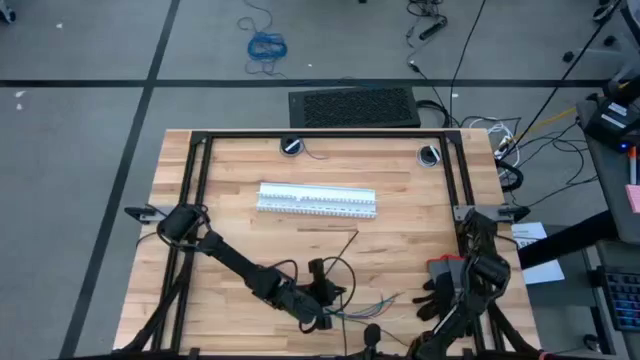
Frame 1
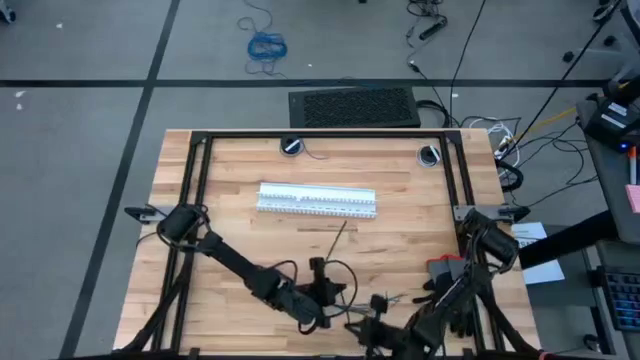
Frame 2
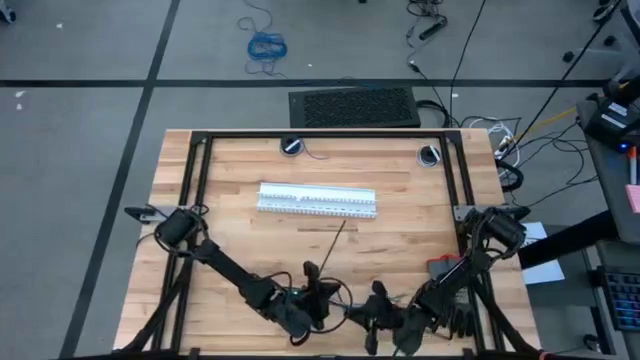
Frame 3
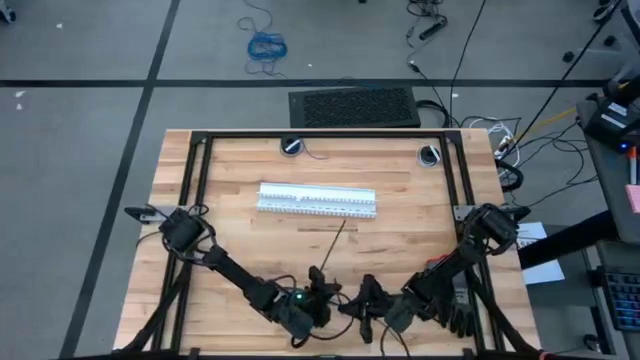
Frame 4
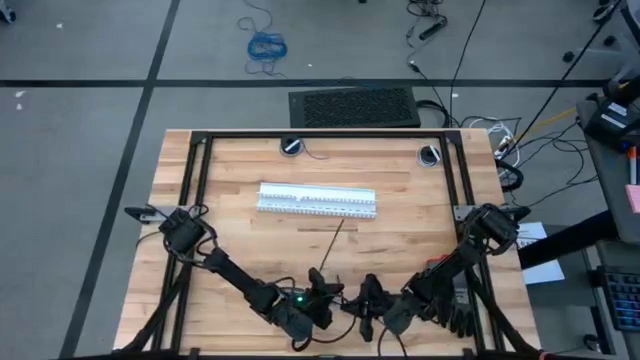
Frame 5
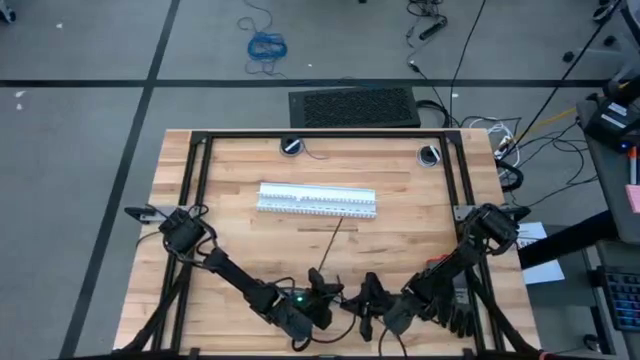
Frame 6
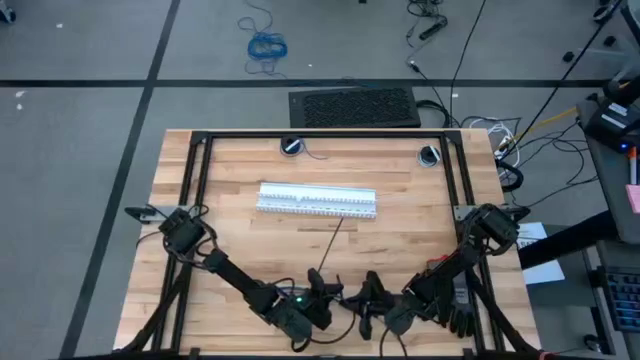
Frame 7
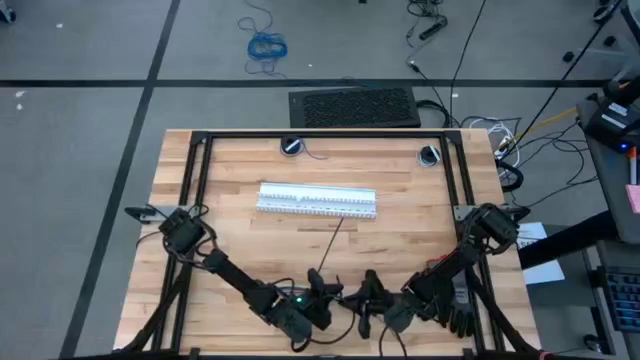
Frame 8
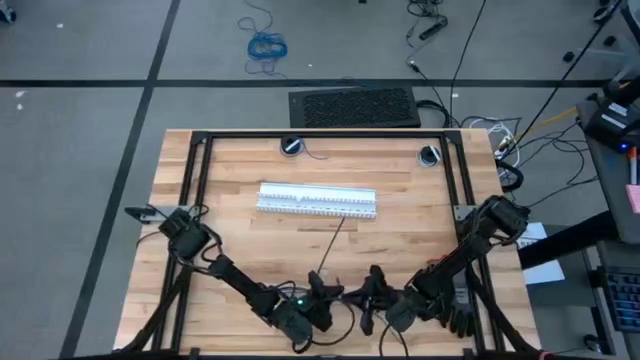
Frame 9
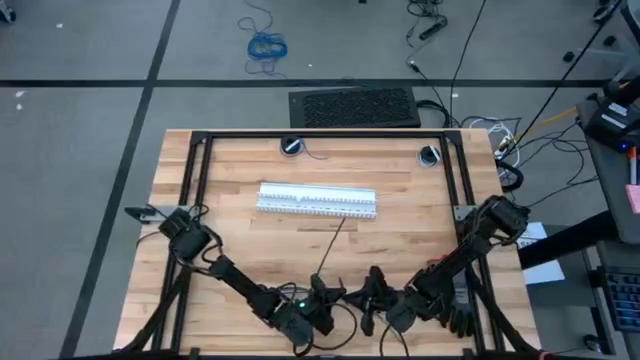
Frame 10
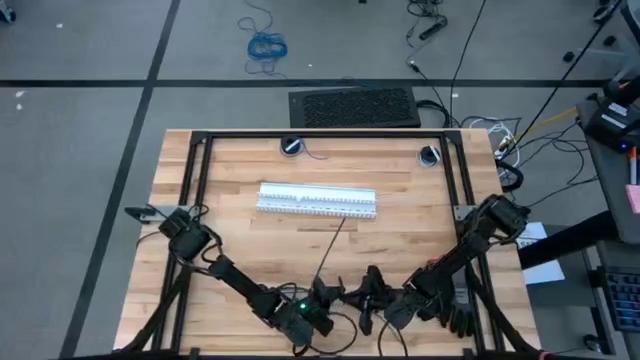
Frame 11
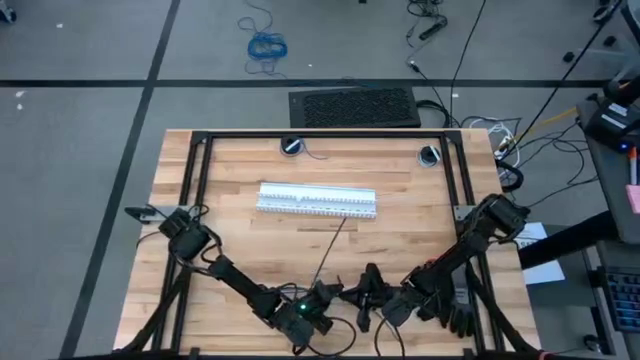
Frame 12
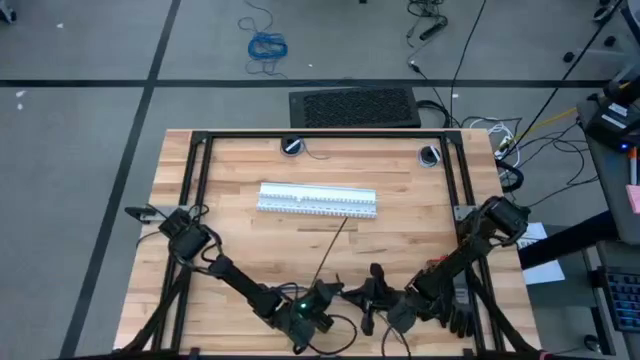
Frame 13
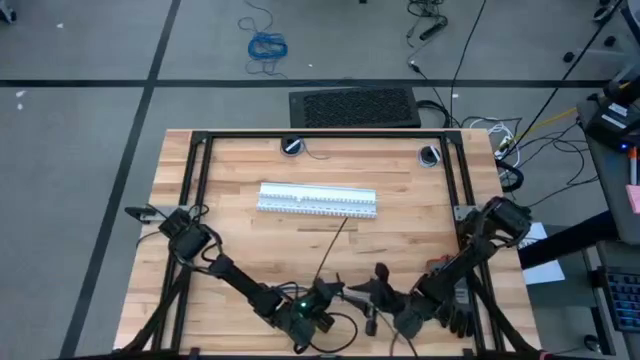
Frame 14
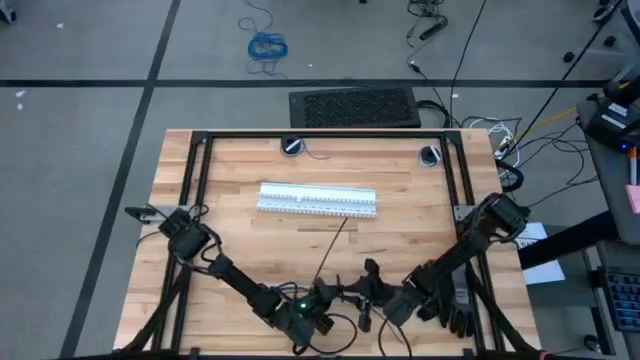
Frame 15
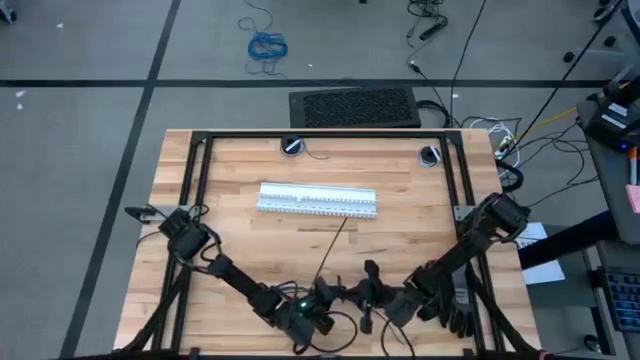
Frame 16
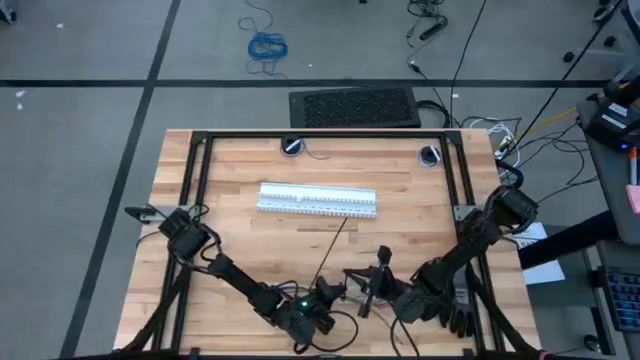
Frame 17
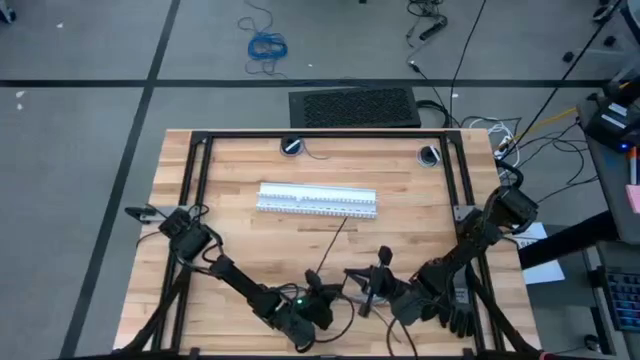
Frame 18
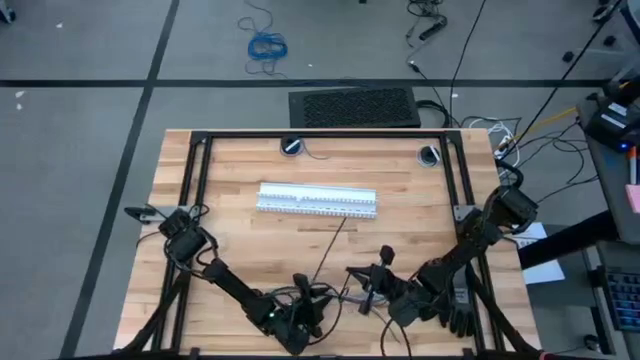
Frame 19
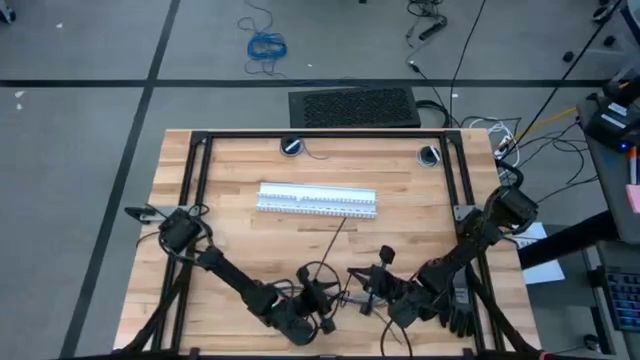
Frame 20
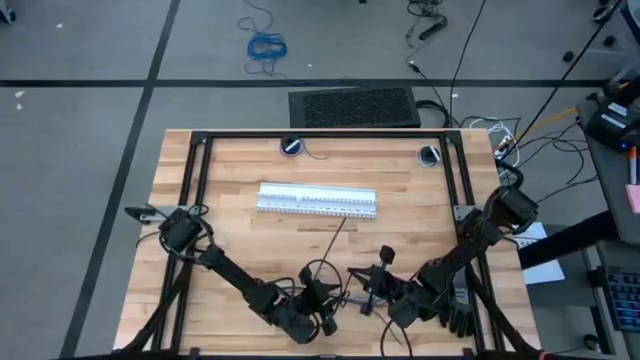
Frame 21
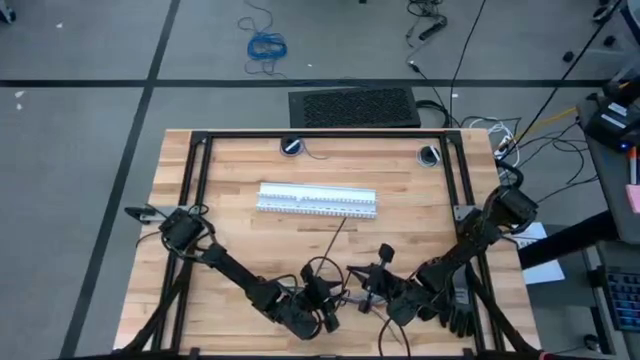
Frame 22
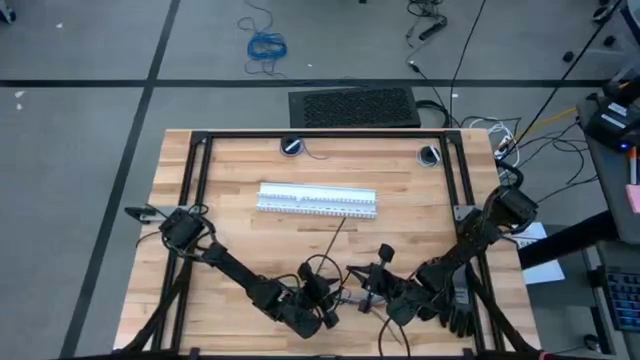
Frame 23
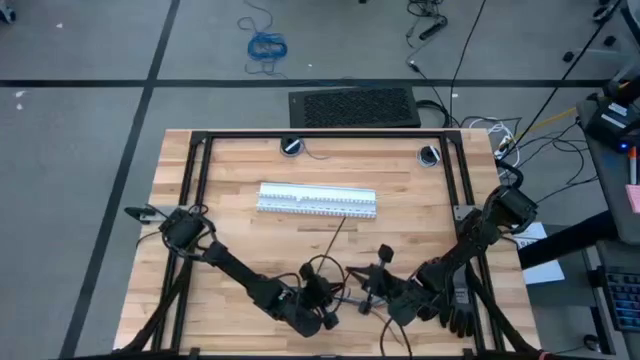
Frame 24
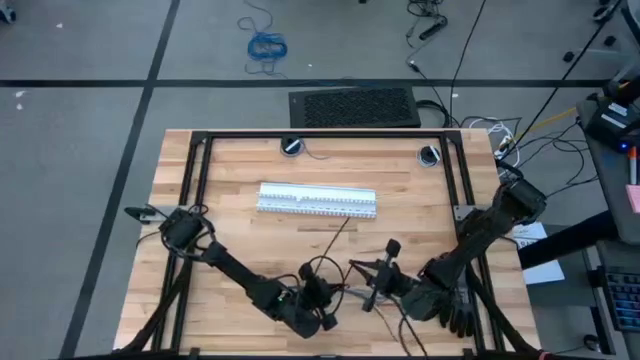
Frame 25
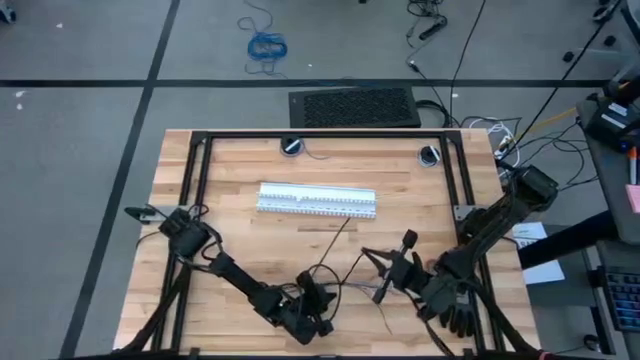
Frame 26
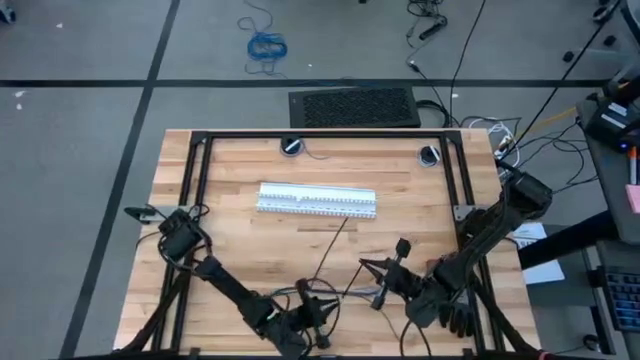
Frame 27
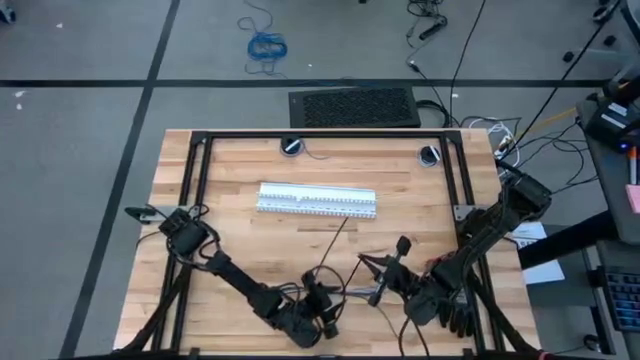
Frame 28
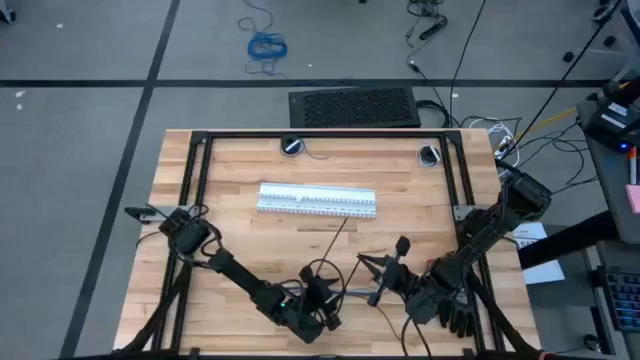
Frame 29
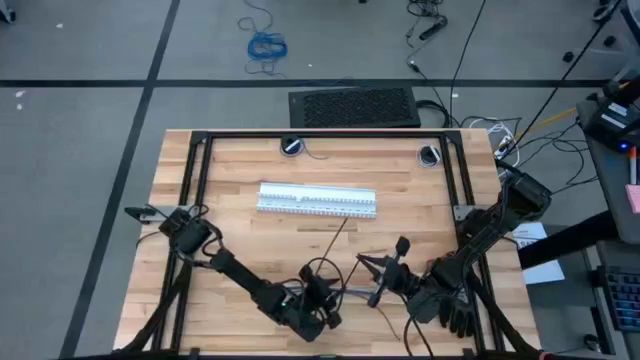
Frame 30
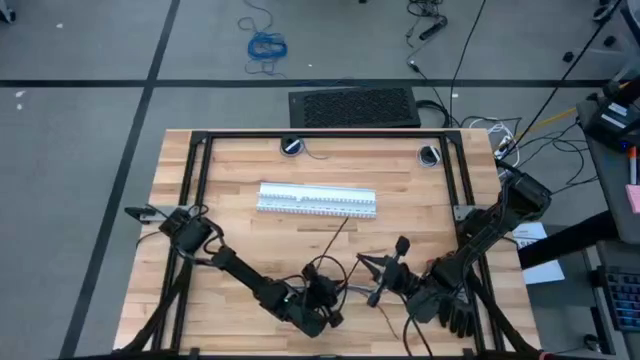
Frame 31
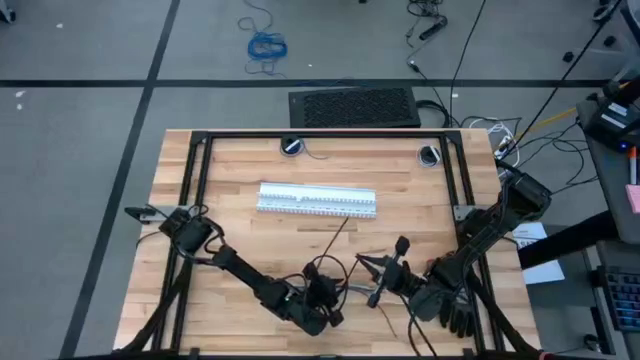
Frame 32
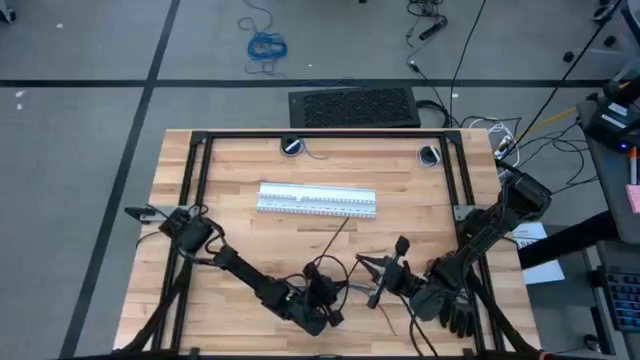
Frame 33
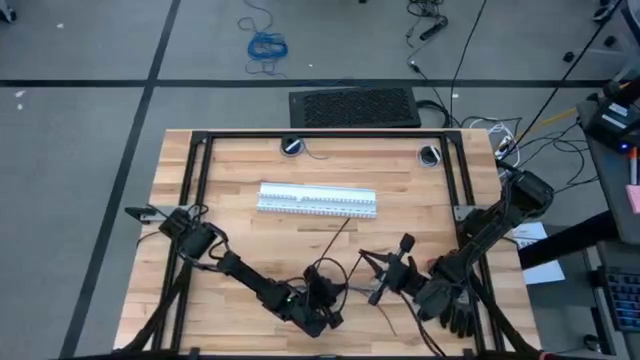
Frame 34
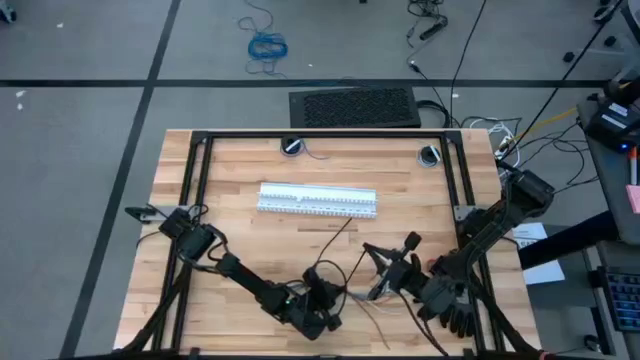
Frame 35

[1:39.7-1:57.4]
Task: Ziptie cables
Wrap the cables together using a zip tie

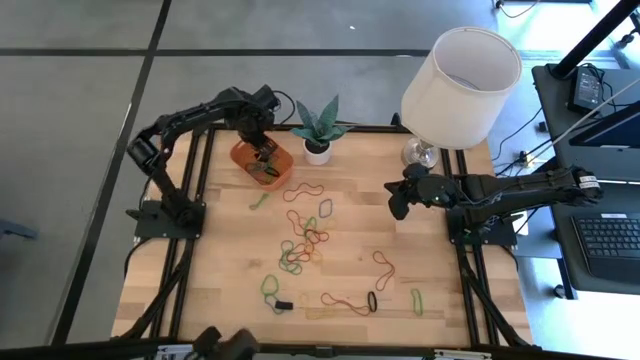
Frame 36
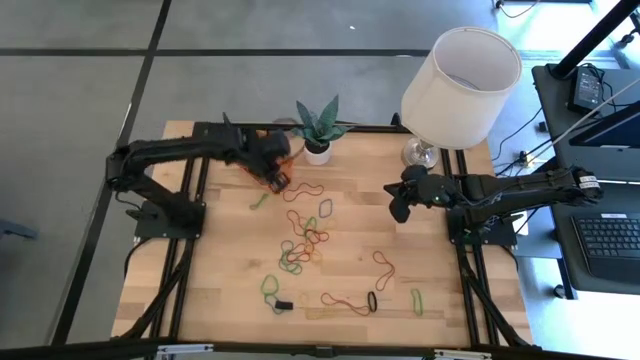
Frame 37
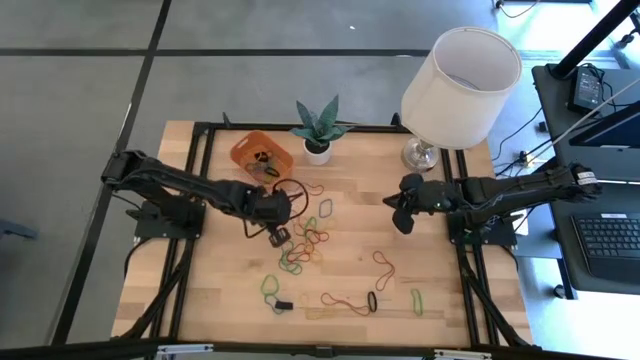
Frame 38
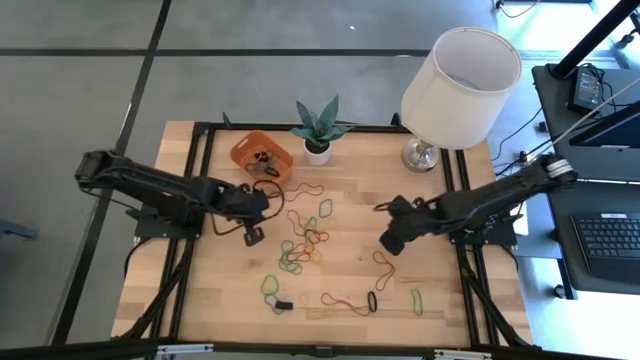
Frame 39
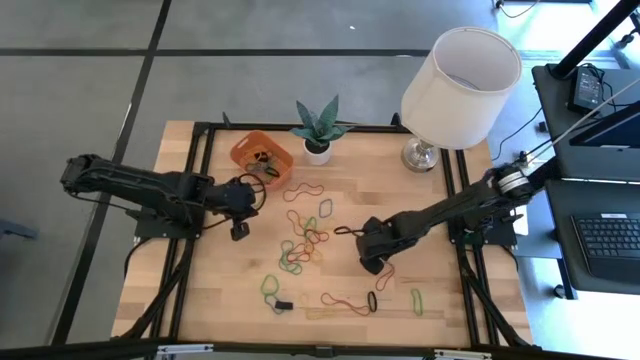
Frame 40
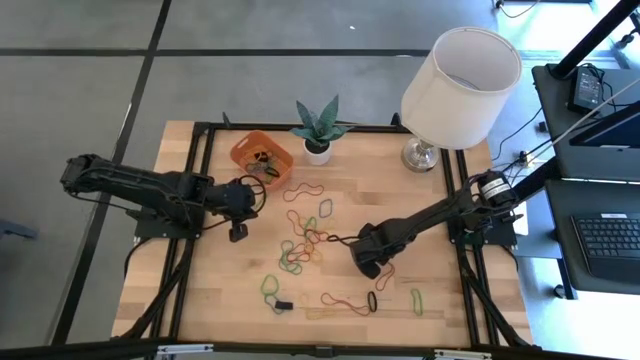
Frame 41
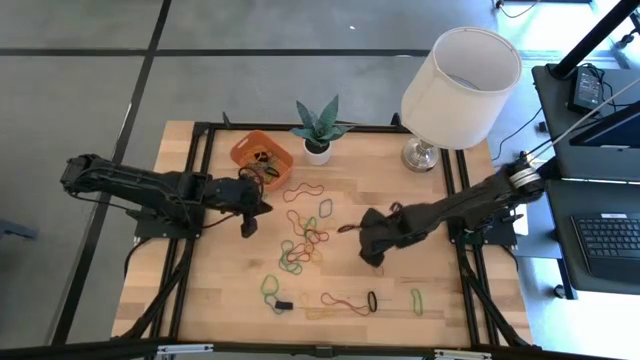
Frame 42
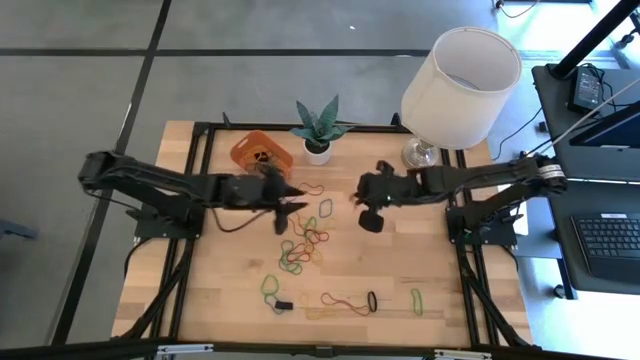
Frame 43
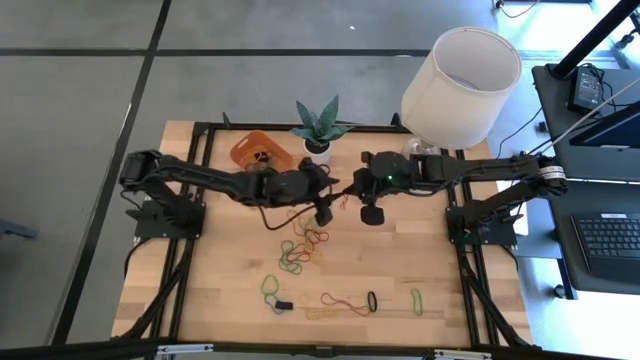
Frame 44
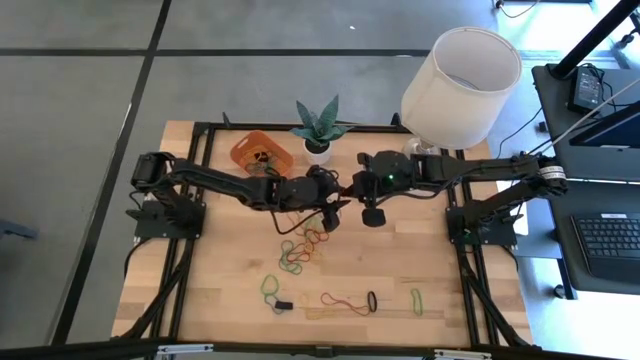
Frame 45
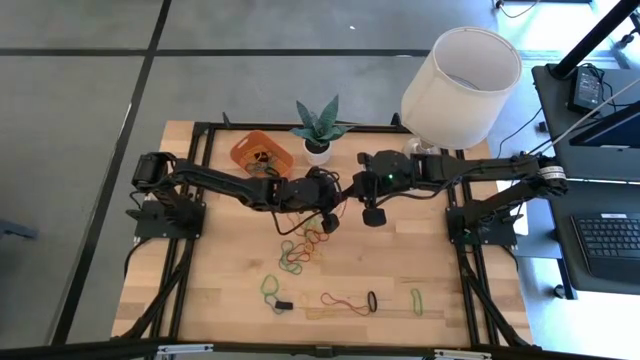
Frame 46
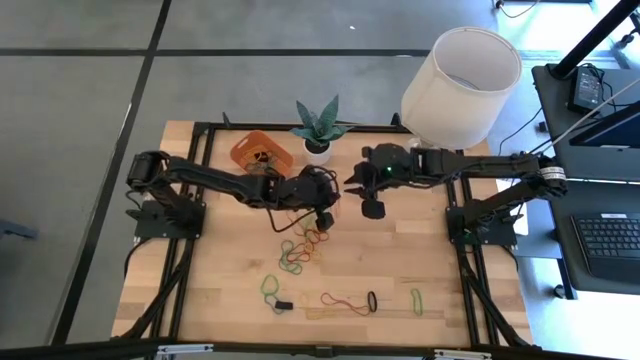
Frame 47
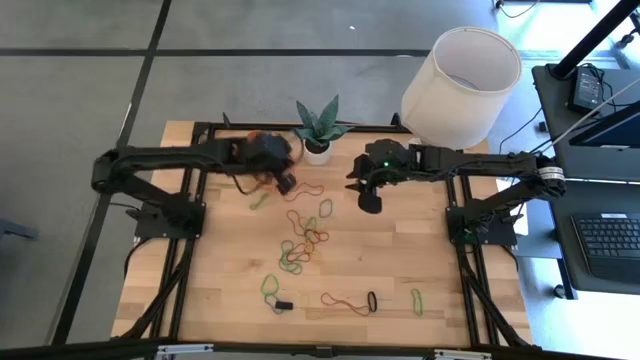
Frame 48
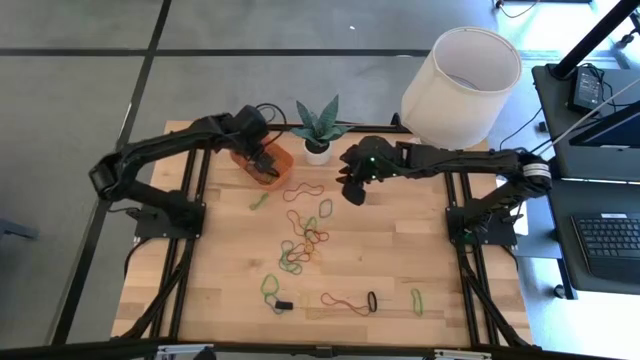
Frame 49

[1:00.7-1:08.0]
Task: Pick and place rubber bands into bin
Put the red rubber band into the orange bin
